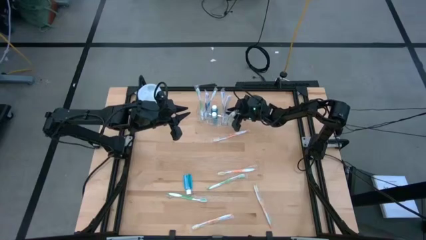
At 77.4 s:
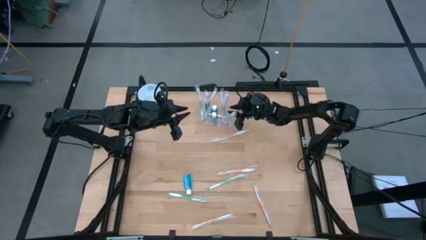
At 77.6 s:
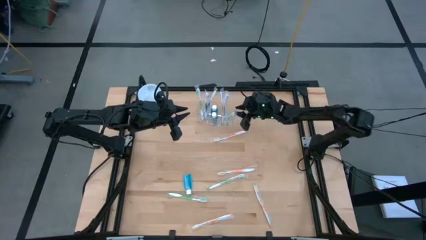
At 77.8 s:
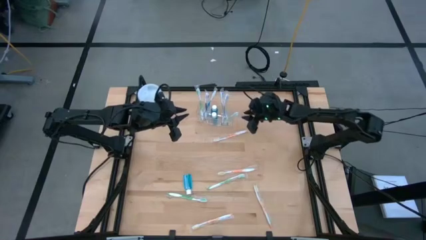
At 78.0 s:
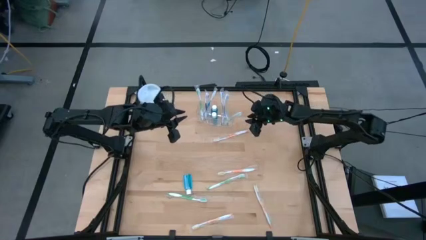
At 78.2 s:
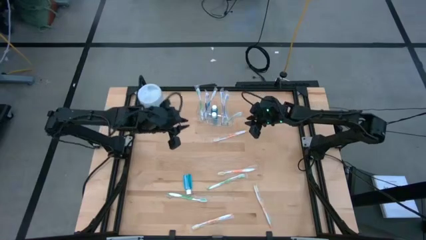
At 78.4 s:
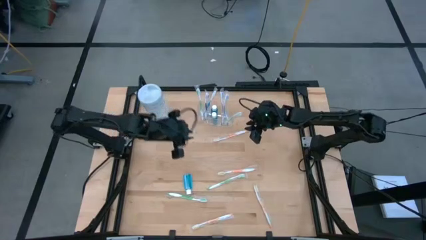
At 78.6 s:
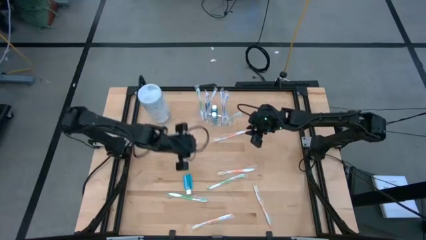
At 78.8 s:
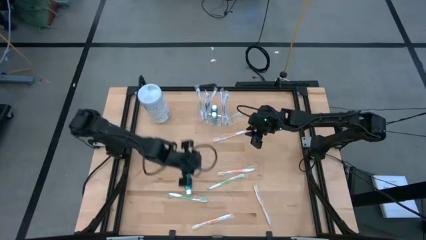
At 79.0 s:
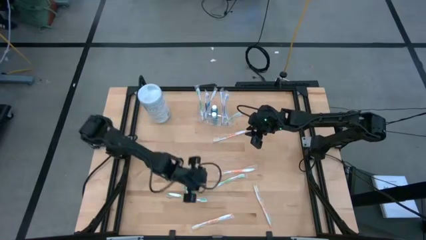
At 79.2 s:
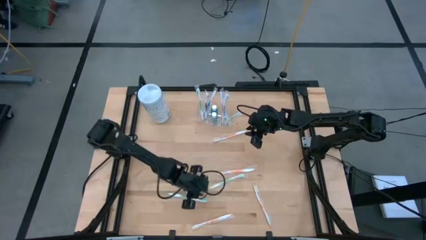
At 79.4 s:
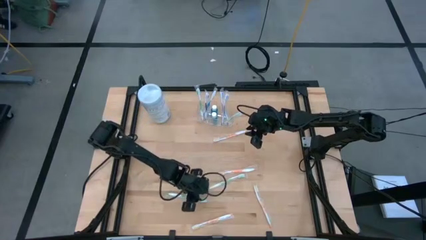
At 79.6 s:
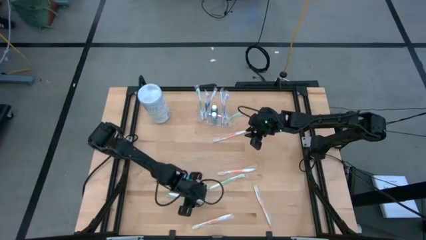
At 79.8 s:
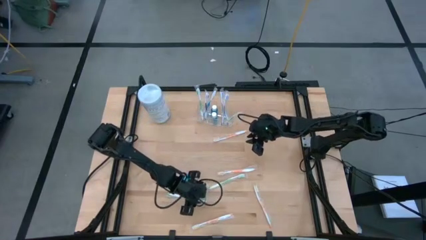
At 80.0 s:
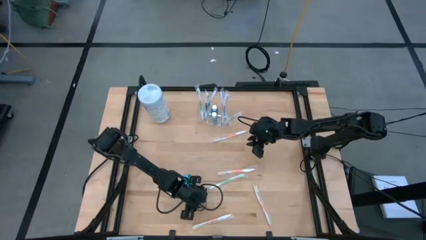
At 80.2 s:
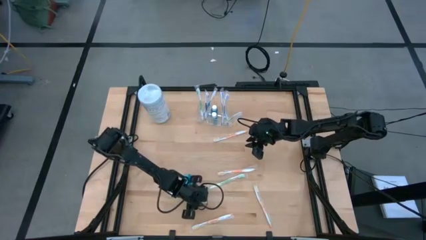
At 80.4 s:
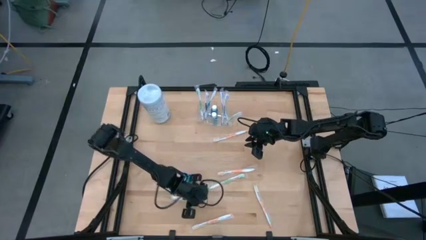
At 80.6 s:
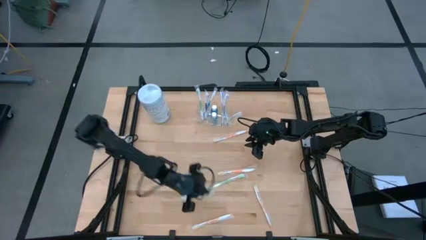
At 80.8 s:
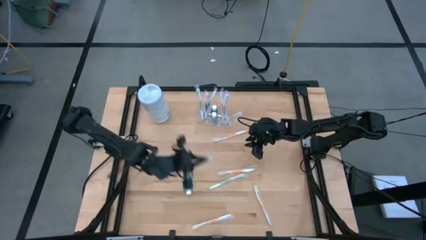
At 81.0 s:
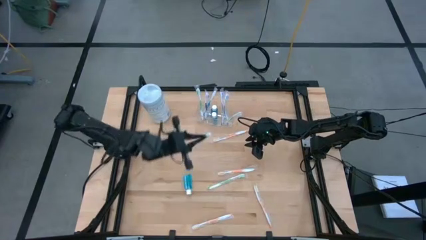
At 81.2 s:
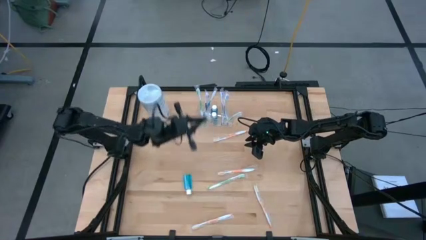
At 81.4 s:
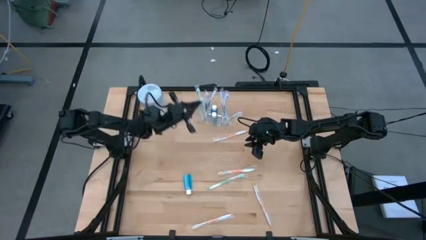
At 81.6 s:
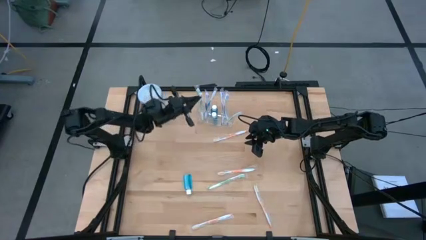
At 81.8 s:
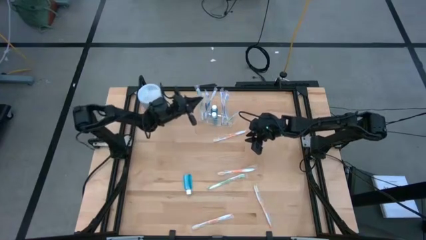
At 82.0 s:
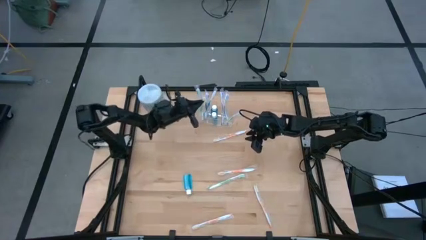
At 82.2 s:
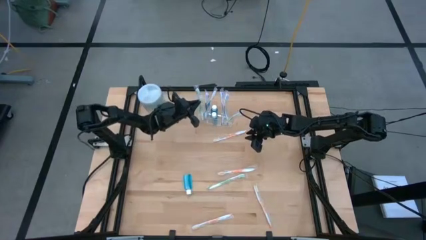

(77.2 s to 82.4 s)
Task: Pick & Place toothbrushing station
Put the green toothbrush into the transparent organizer

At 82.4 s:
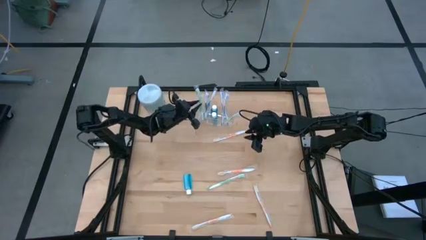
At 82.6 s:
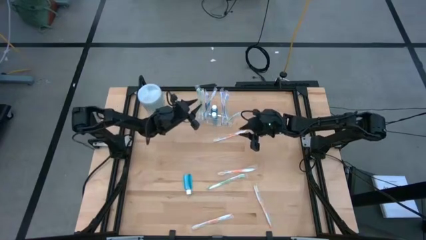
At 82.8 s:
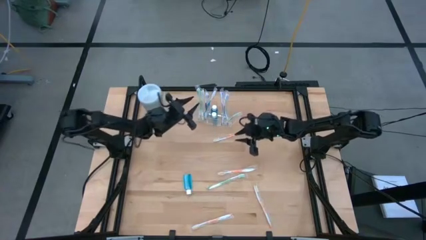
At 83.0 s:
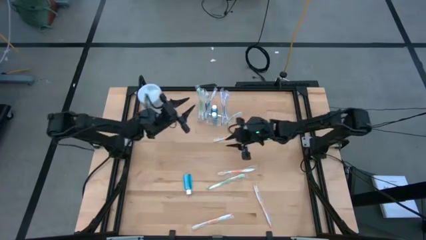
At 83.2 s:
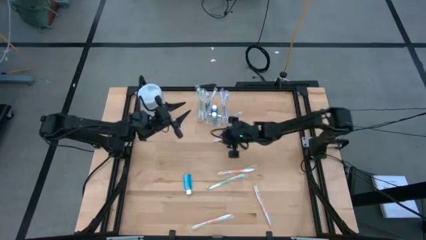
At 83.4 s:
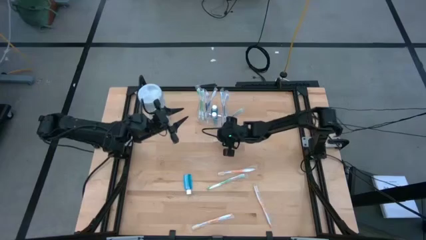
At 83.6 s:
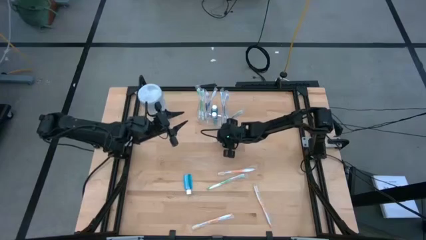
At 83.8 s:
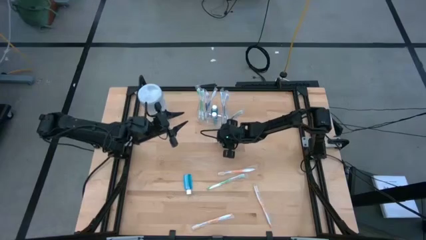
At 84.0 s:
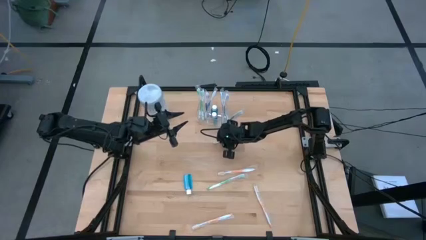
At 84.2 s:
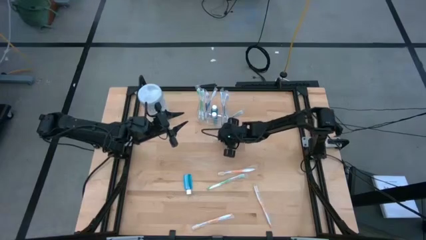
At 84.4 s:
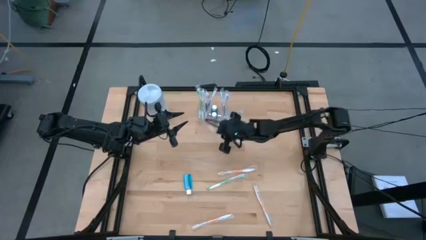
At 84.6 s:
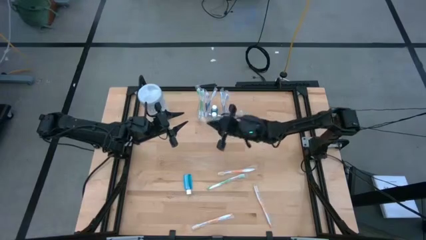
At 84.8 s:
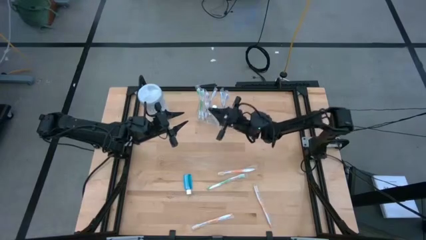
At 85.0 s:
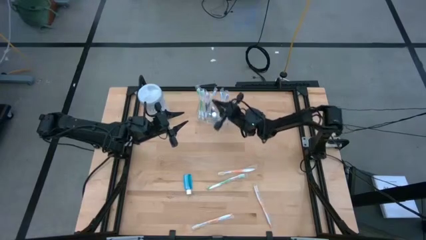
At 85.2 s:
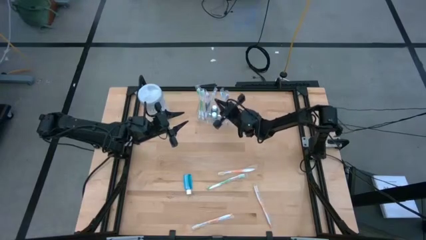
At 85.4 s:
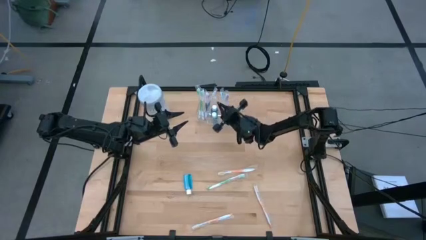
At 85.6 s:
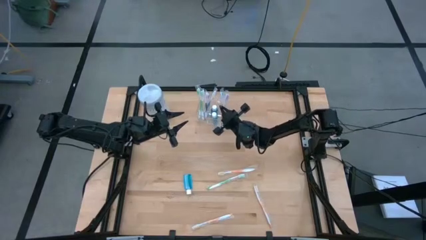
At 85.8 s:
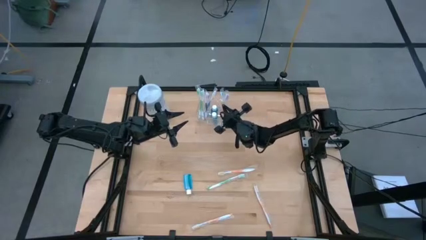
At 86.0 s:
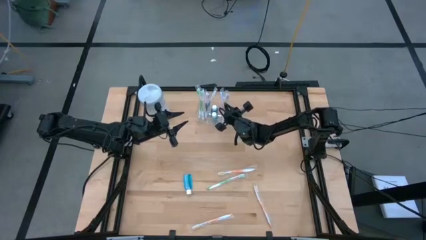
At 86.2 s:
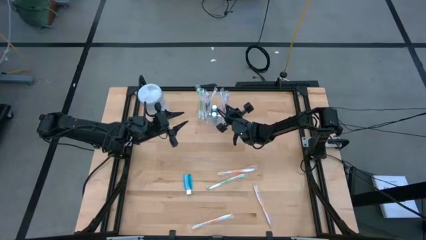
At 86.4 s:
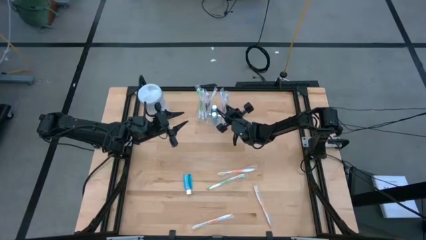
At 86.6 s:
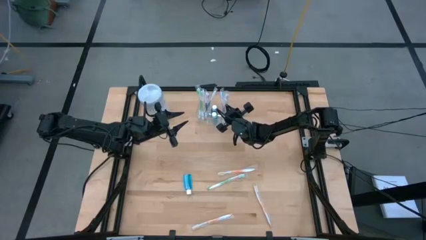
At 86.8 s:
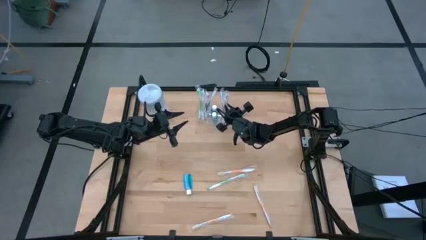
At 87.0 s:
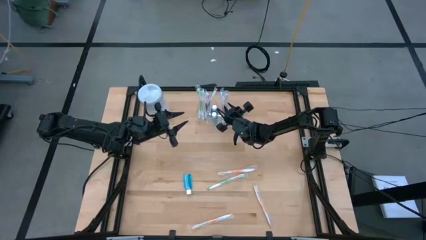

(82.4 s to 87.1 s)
Put the orange toothbrush into the transparent organizer

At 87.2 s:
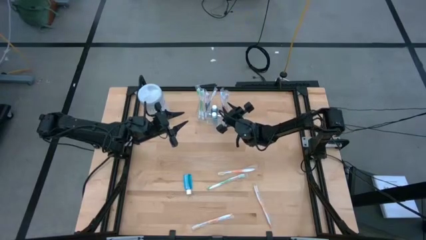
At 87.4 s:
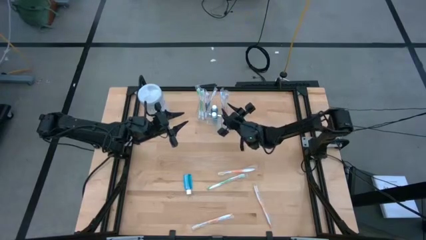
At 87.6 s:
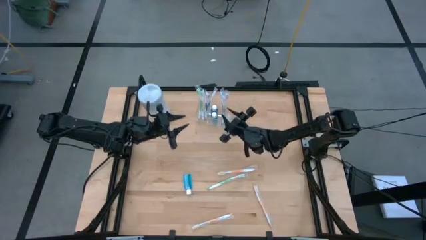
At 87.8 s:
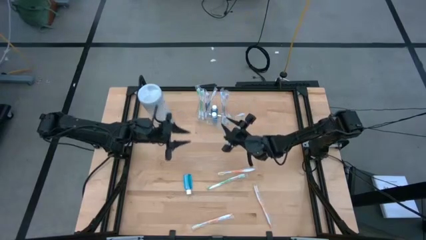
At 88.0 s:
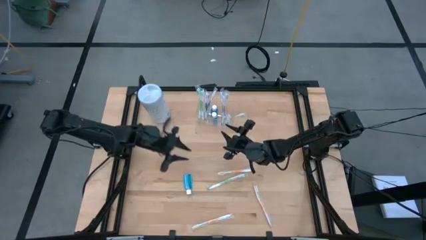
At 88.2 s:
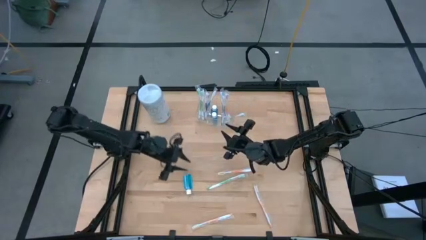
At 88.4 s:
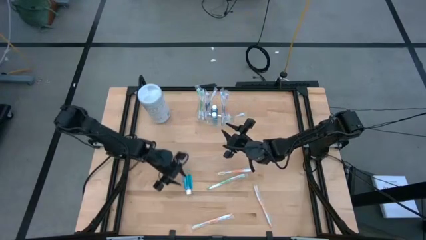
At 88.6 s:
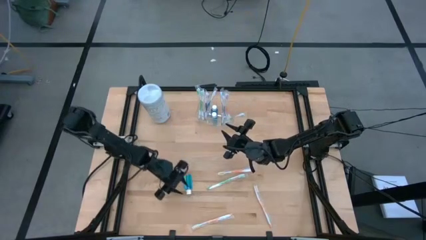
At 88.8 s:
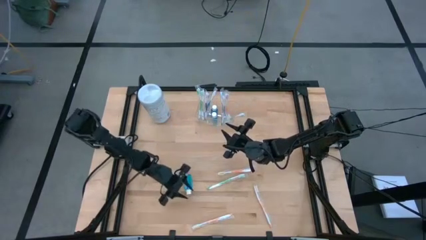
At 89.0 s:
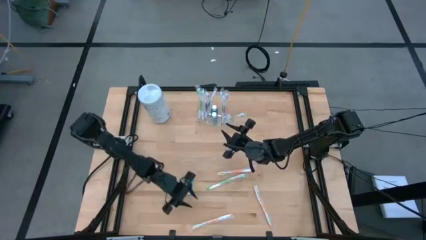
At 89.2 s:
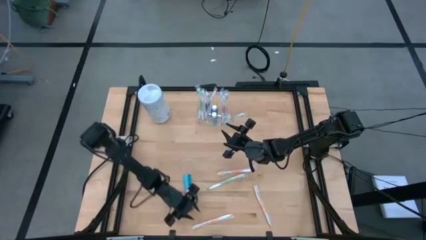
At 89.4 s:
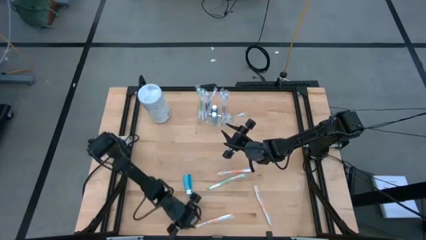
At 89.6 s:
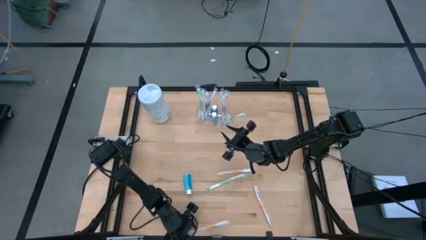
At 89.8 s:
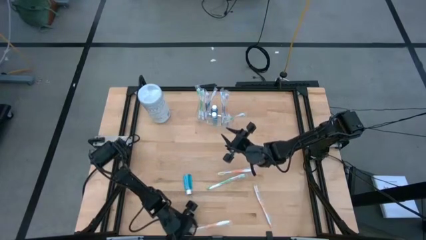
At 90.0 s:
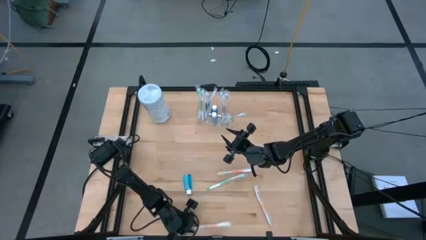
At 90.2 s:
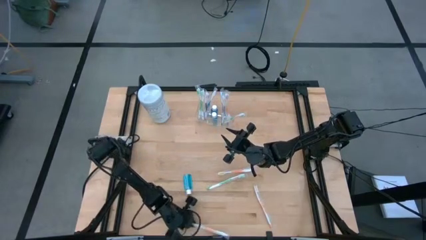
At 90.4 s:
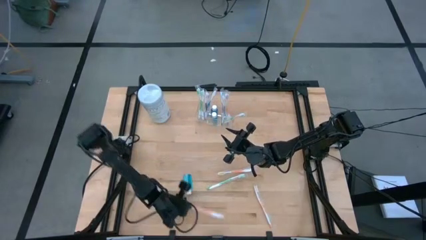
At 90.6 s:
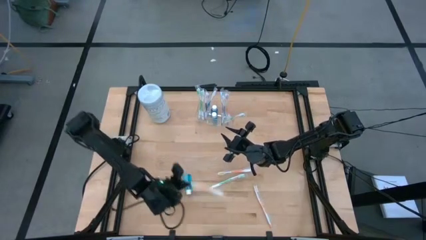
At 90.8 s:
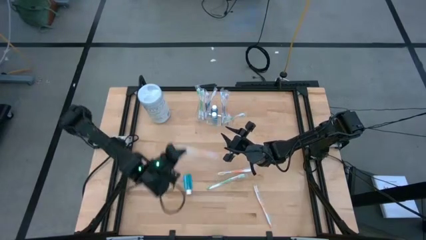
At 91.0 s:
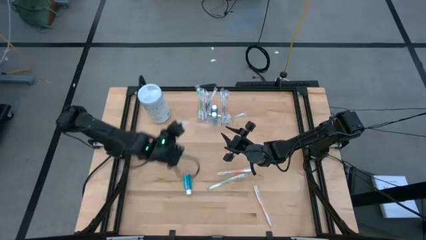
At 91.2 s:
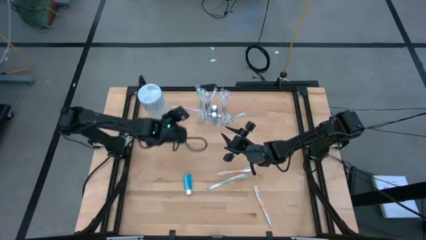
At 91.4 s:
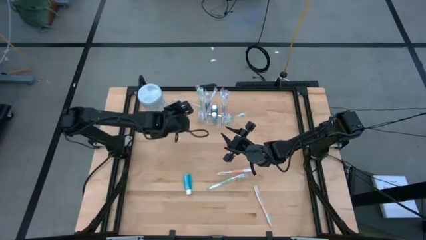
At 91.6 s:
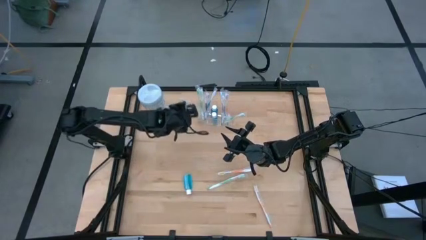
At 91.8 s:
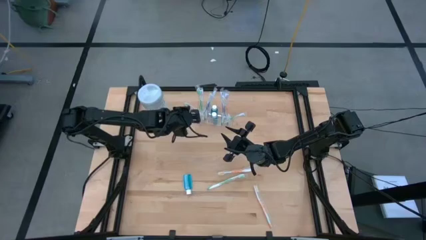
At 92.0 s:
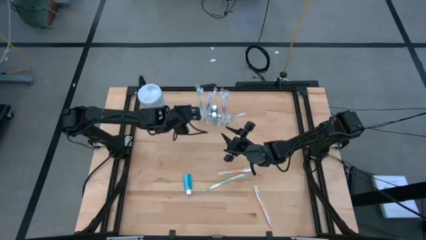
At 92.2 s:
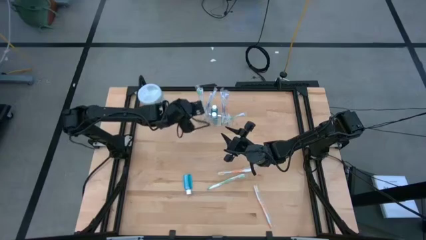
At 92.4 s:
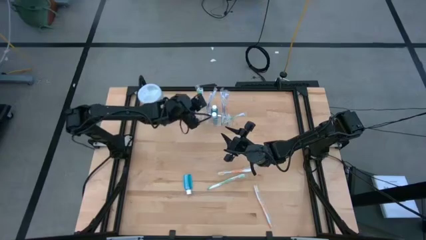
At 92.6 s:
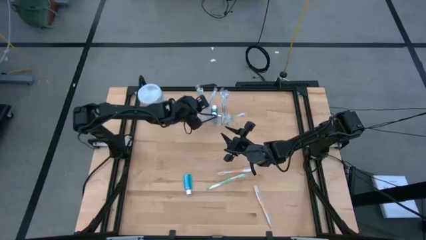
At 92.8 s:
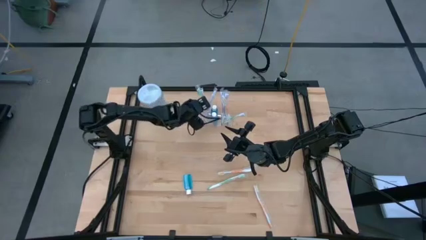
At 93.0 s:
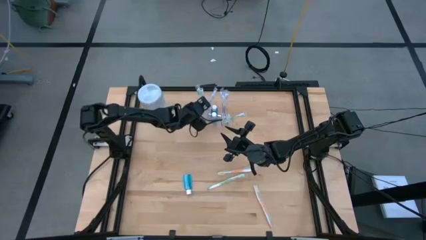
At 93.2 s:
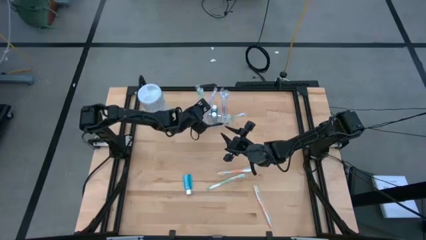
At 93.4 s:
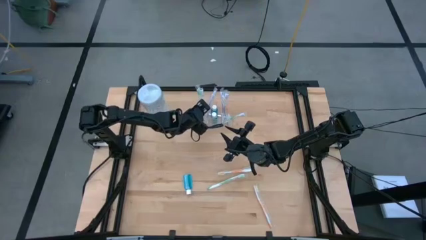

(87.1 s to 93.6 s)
Put the orange toothbrush into the transparent organizer
